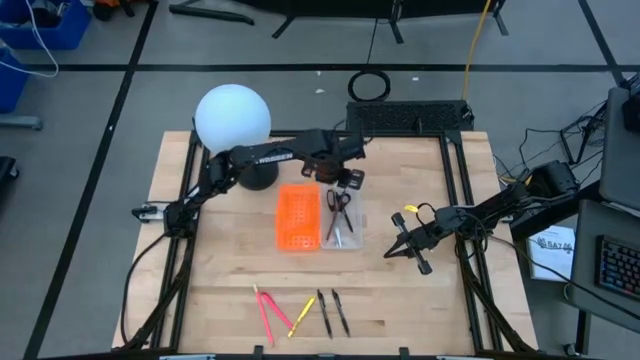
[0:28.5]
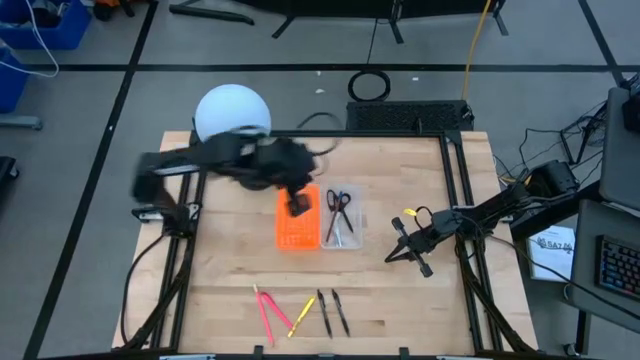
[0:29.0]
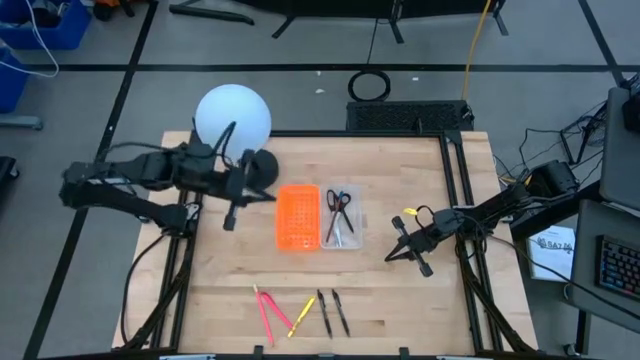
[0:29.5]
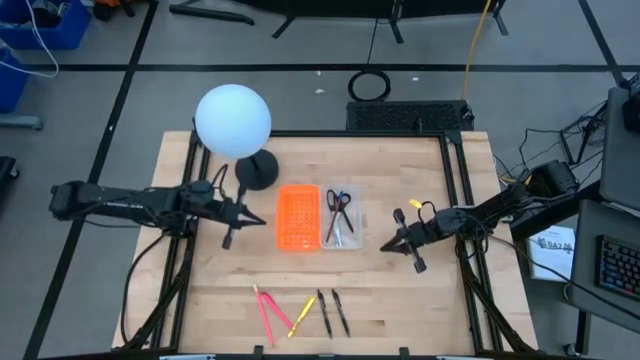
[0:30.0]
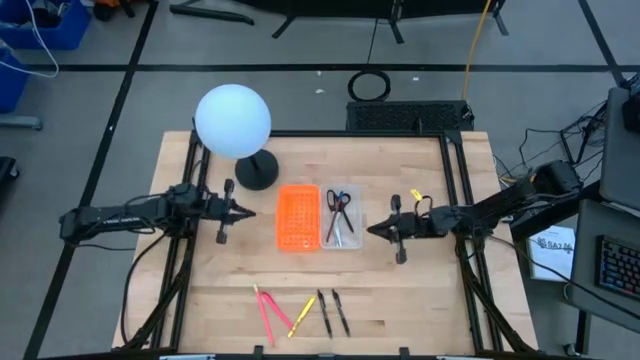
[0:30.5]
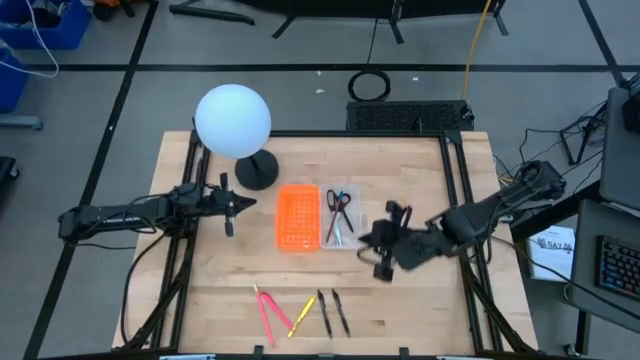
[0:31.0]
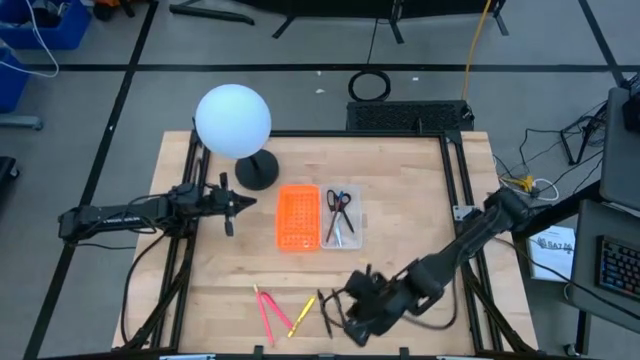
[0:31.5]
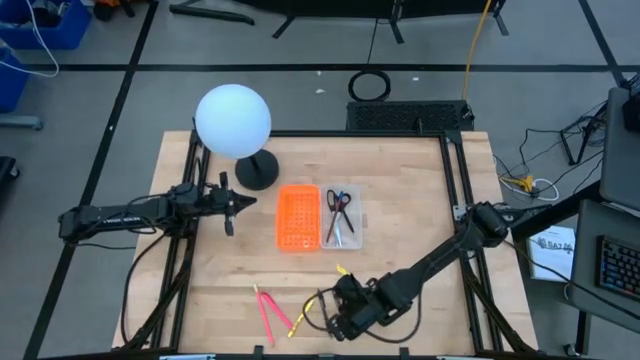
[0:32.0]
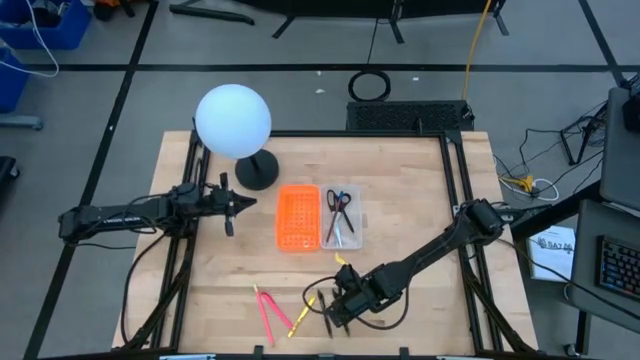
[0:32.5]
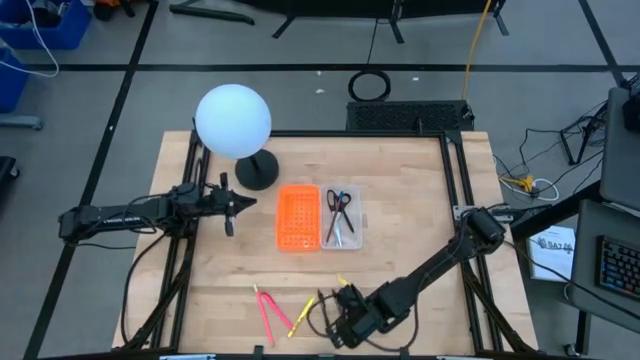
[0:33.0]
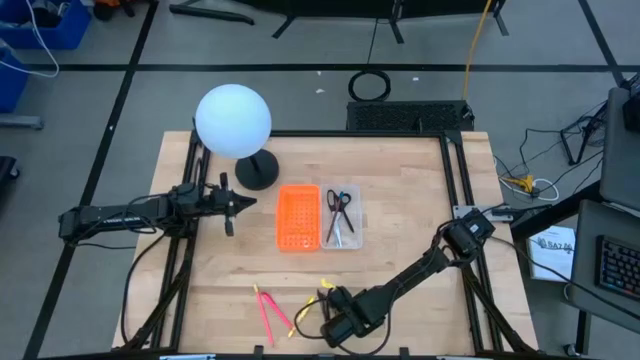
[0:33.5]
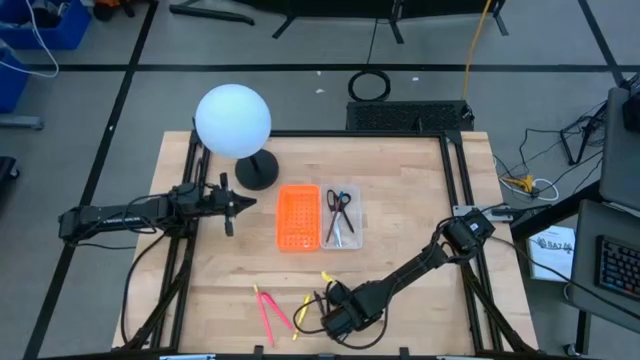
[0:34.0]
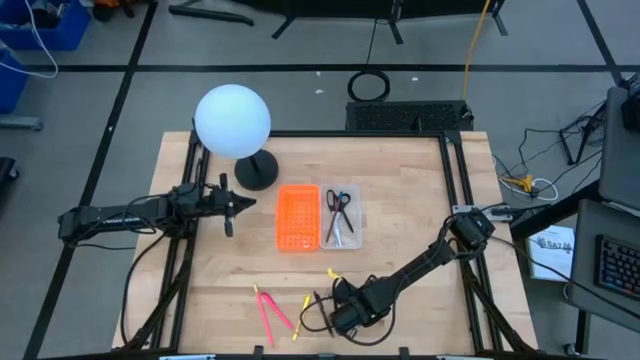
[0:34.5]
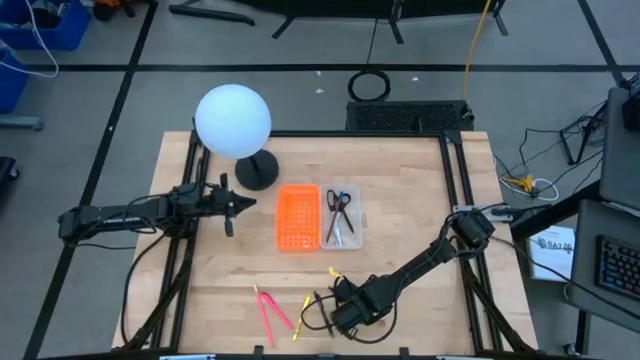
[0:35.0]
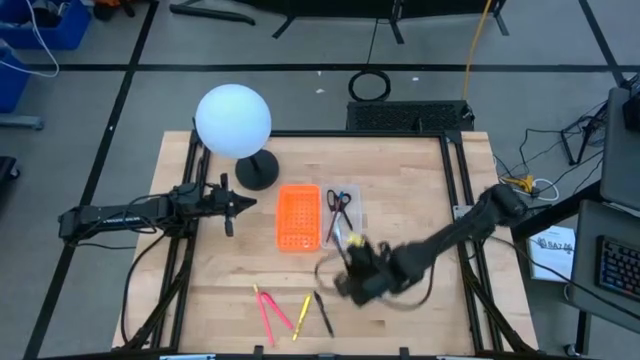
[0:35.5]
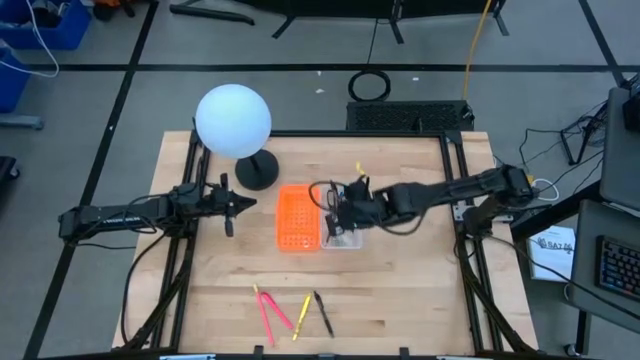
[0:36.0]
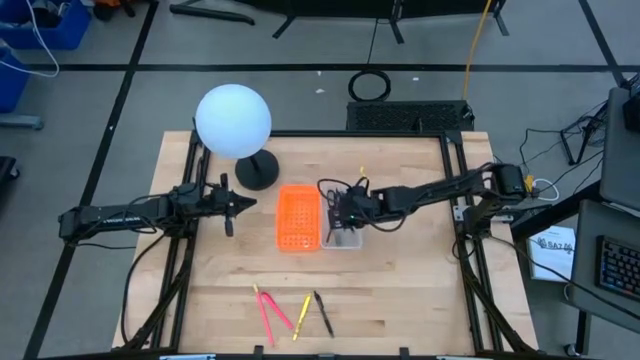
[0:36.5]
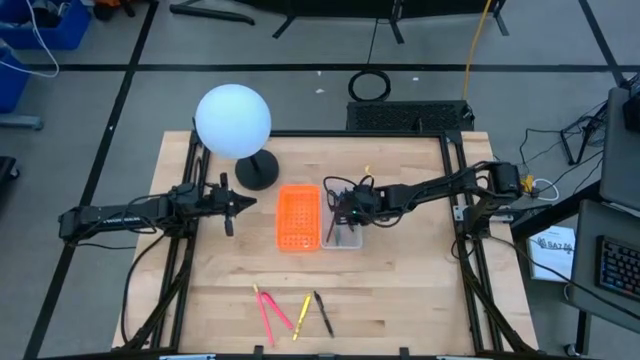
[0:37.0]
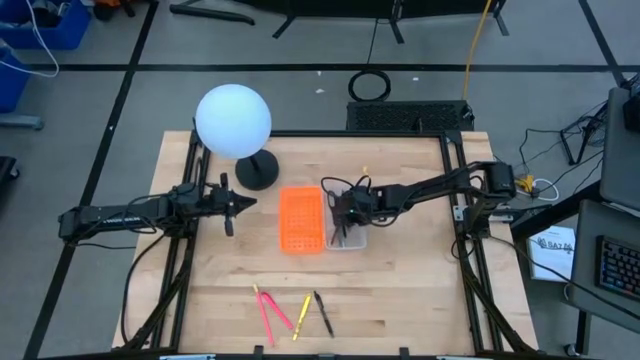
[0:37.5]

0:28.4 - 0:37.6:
Task: Pick & place school supplies into a supply box
Put the right black pen into the orange supply box

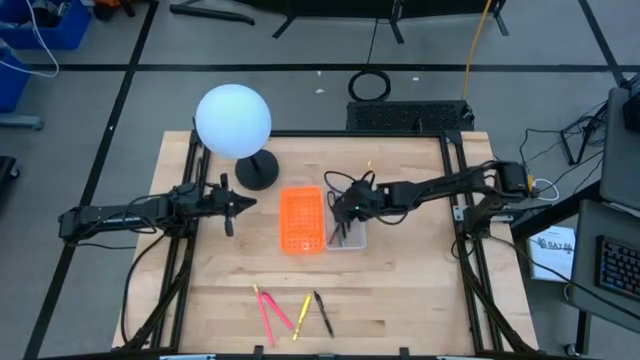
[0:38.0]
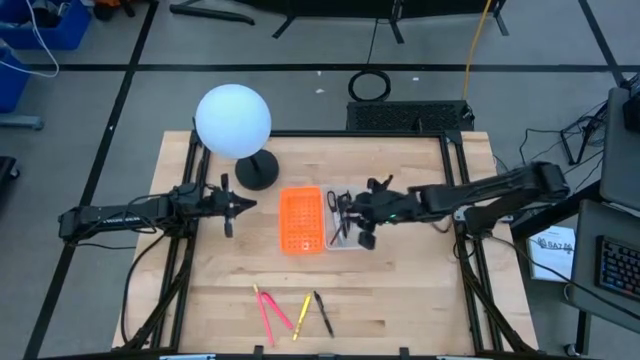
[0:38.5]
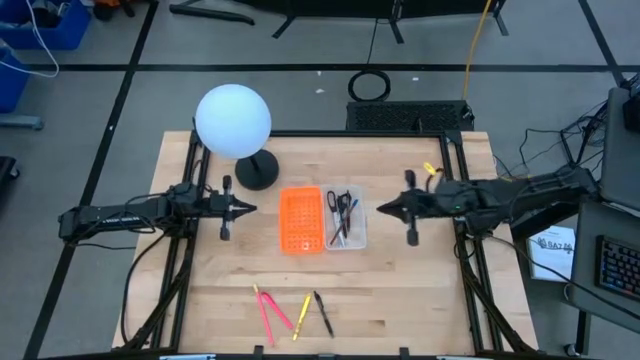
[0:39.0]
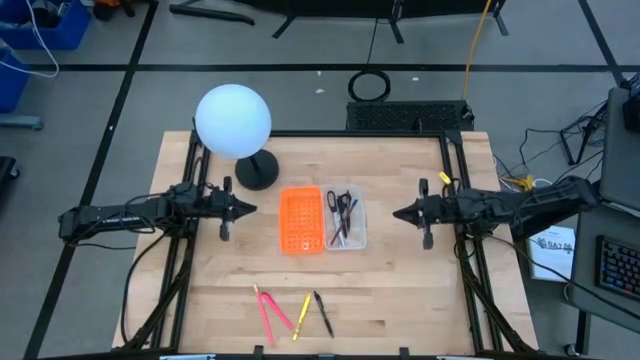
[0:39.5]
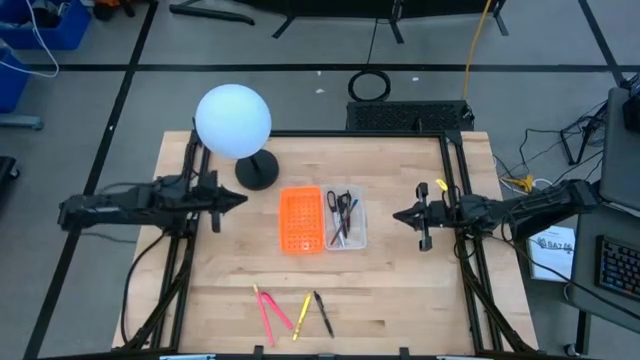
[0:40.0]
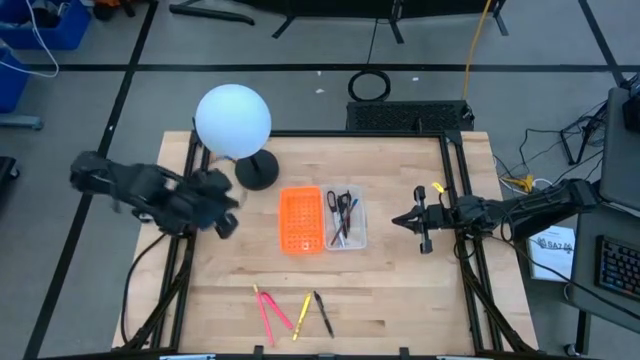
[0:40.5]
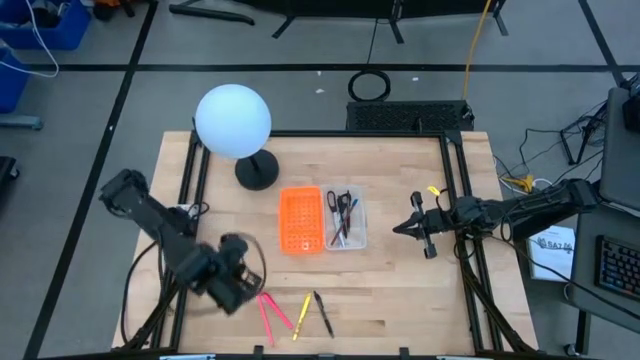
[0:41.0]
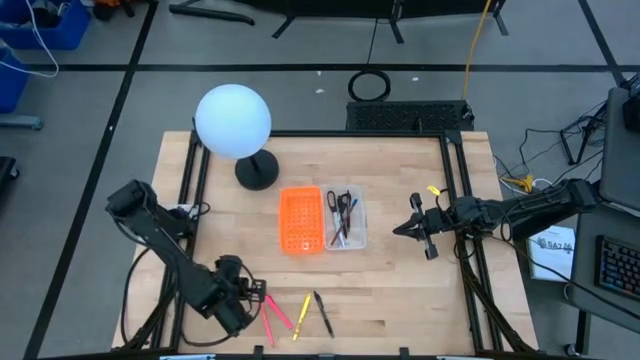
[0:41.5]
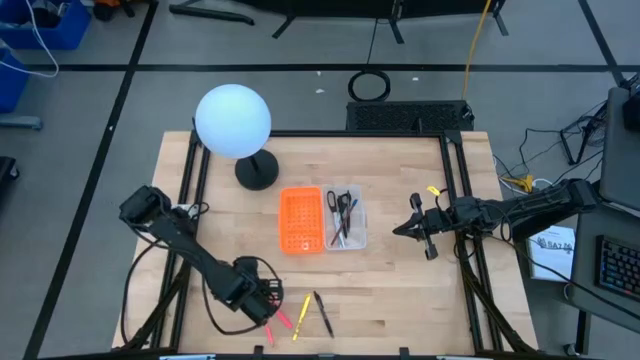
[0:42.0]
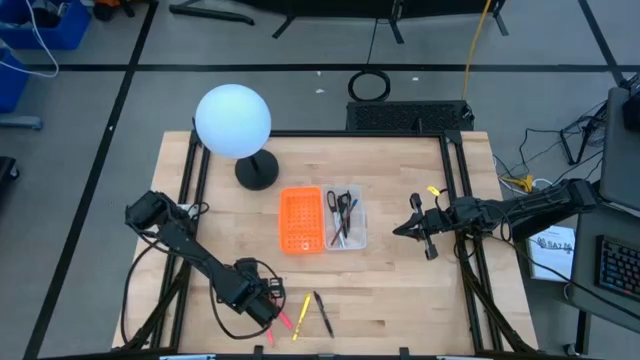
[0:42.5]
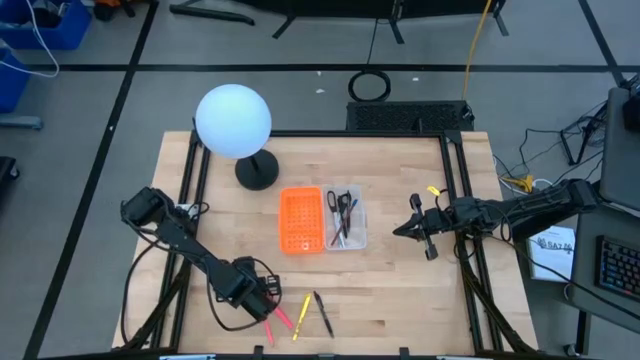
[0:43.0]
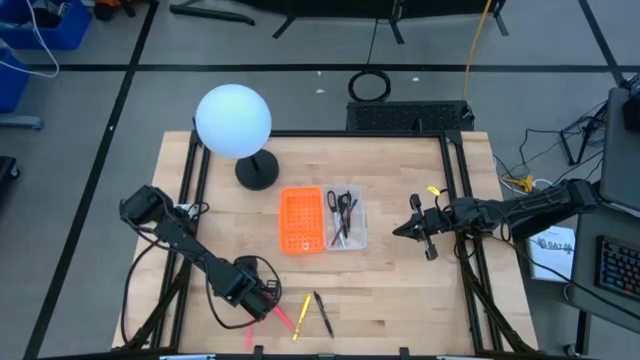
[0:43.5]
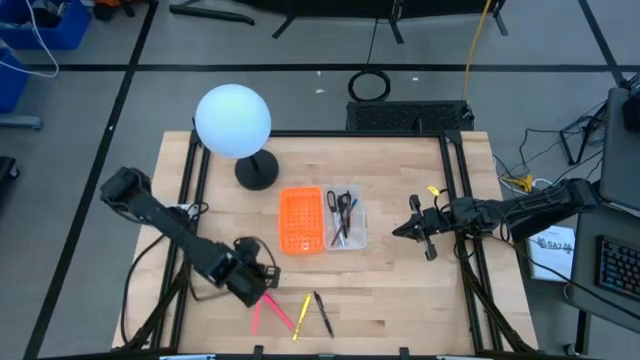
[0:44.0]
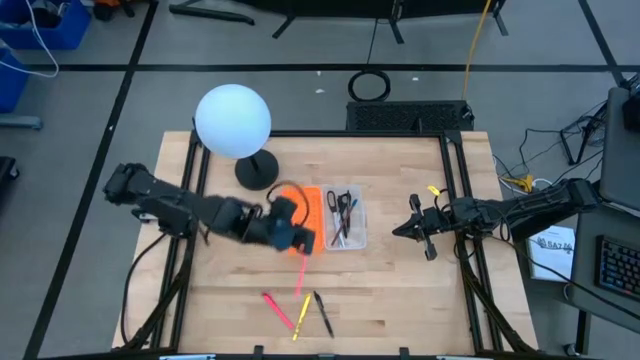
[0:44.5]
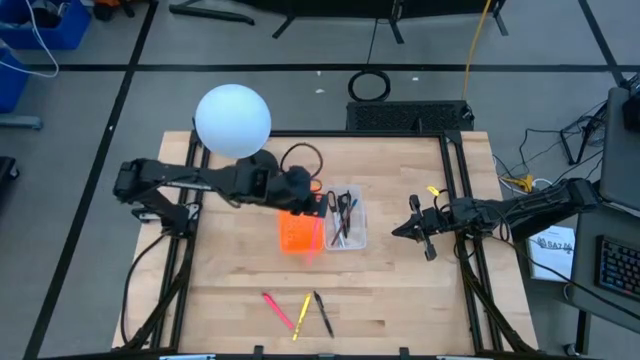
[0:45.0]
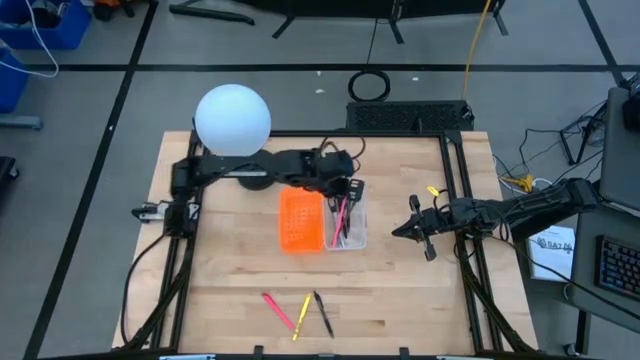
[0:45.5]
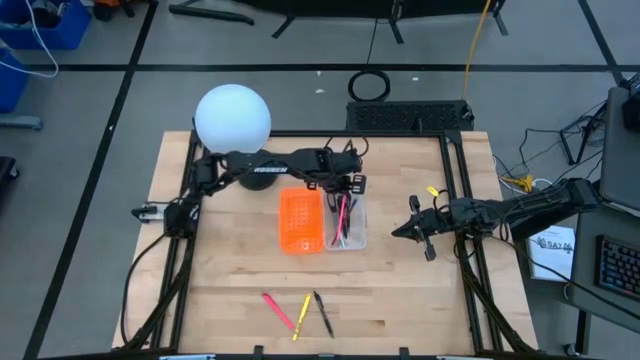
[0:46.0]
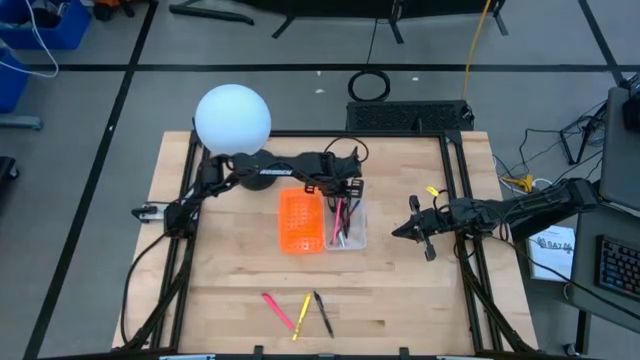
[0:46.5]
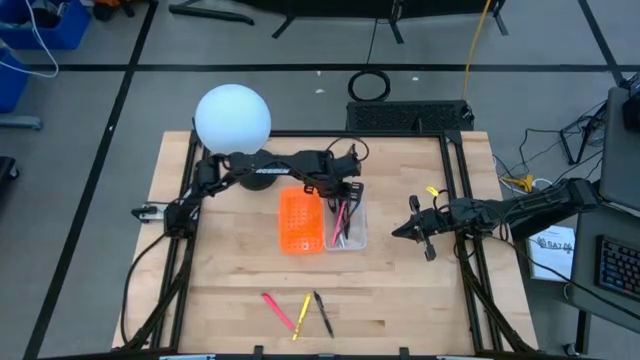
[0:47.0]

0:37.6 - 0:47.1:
Put the pink pencil into the orange supply box
